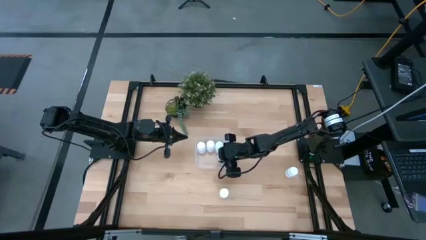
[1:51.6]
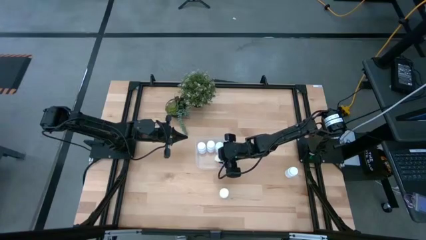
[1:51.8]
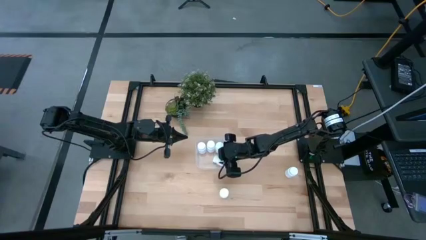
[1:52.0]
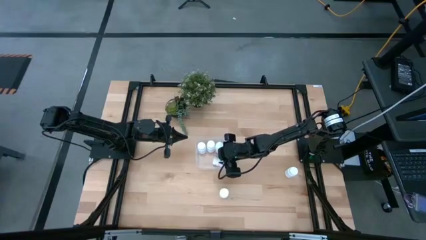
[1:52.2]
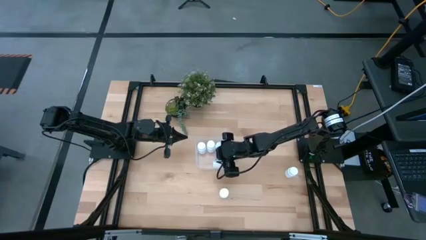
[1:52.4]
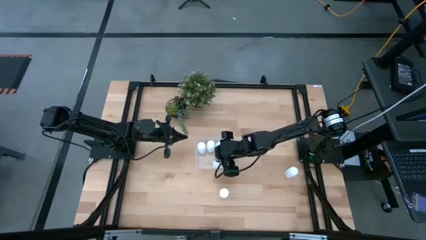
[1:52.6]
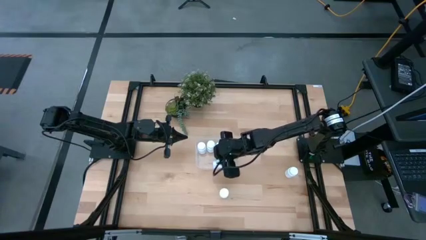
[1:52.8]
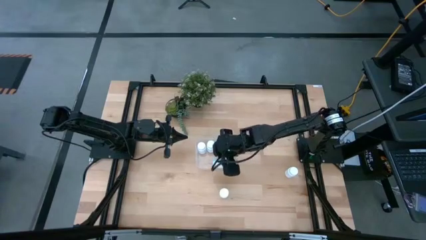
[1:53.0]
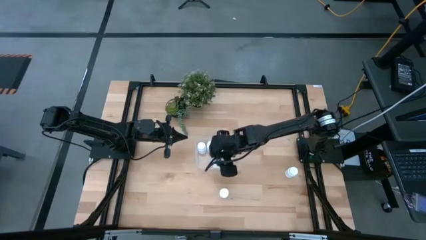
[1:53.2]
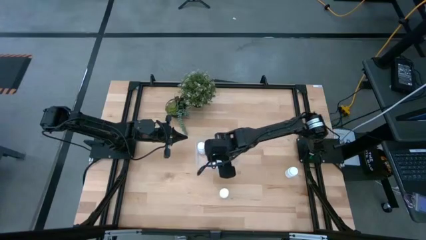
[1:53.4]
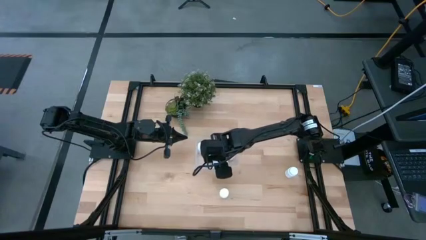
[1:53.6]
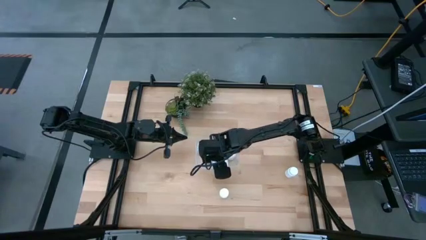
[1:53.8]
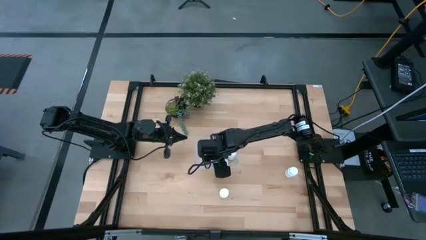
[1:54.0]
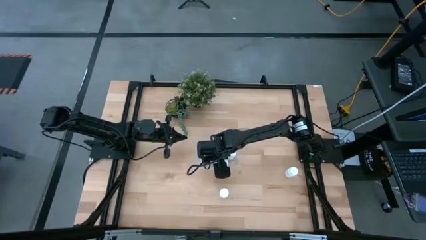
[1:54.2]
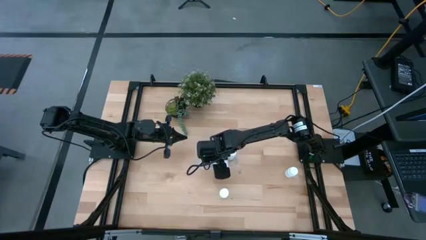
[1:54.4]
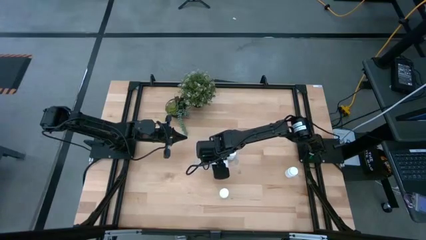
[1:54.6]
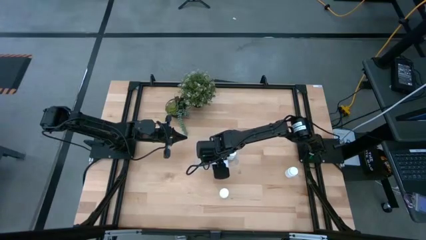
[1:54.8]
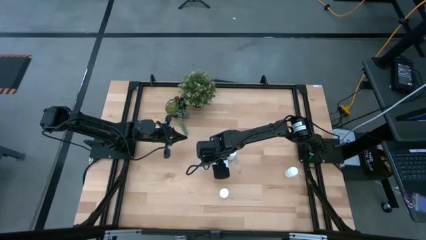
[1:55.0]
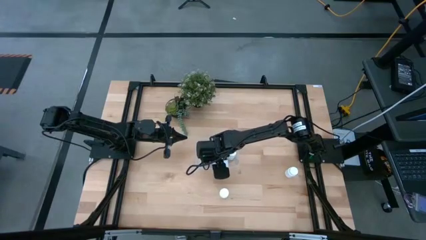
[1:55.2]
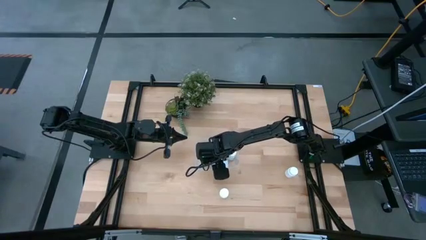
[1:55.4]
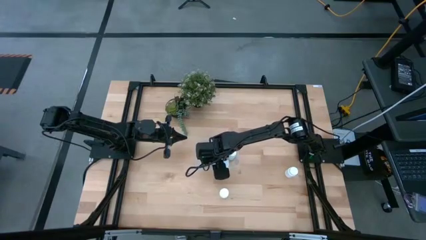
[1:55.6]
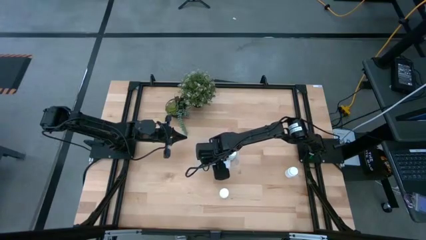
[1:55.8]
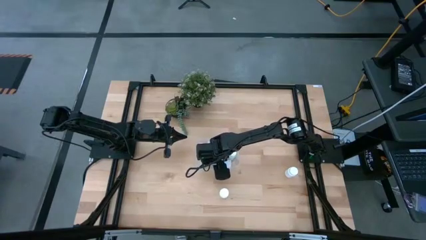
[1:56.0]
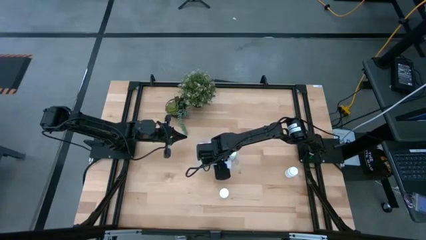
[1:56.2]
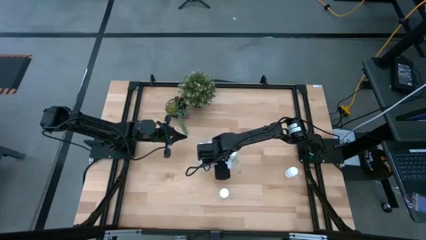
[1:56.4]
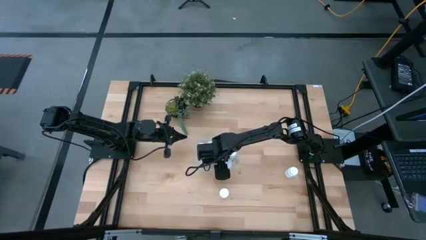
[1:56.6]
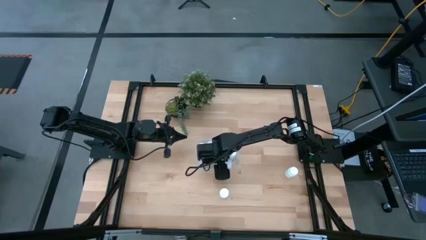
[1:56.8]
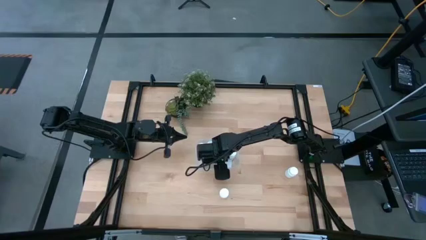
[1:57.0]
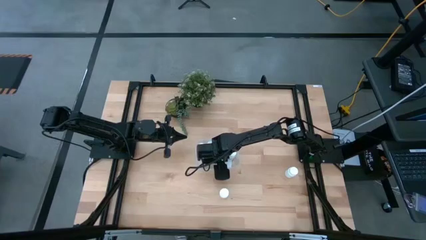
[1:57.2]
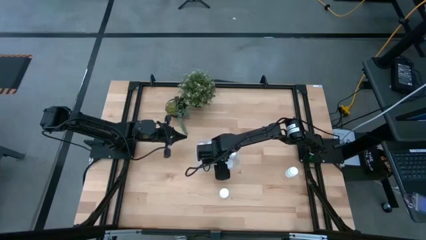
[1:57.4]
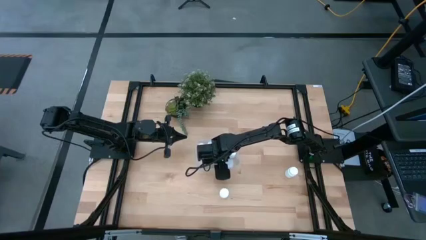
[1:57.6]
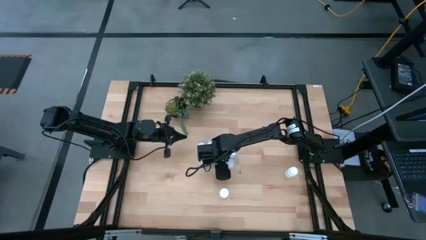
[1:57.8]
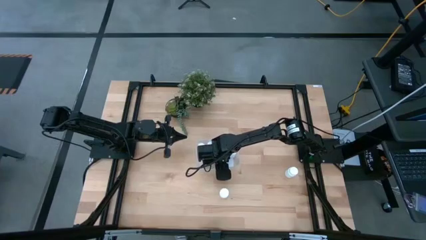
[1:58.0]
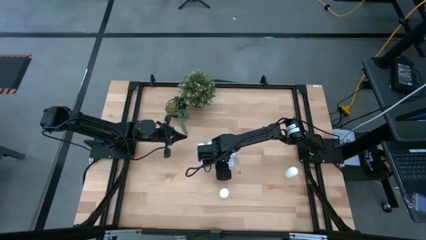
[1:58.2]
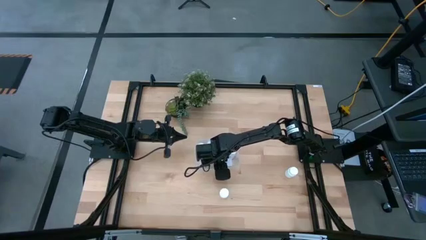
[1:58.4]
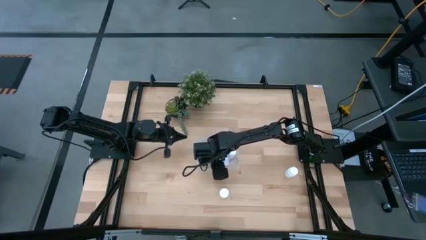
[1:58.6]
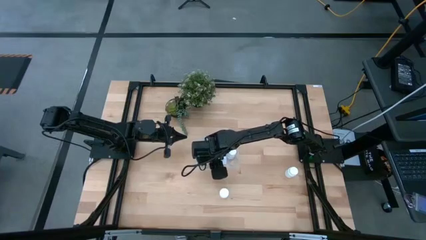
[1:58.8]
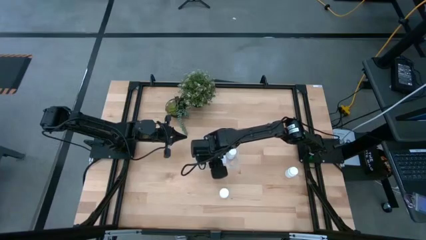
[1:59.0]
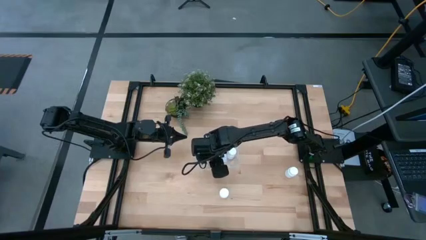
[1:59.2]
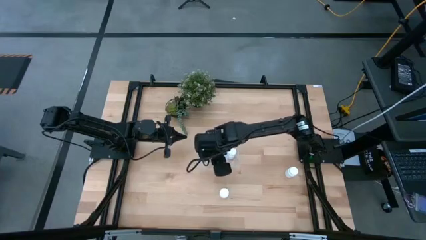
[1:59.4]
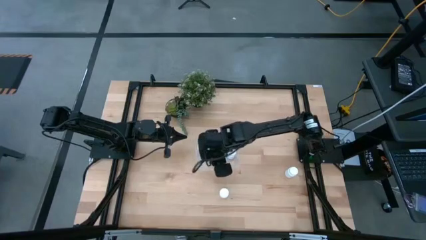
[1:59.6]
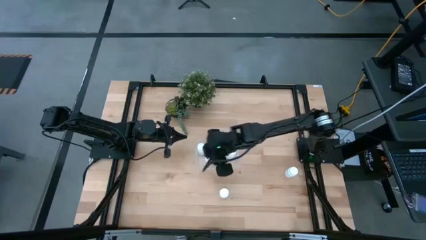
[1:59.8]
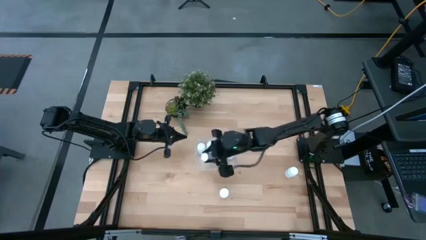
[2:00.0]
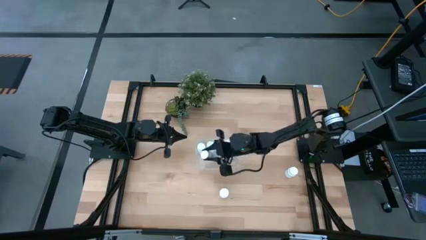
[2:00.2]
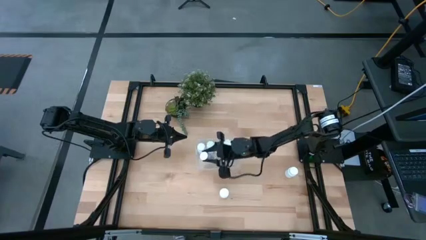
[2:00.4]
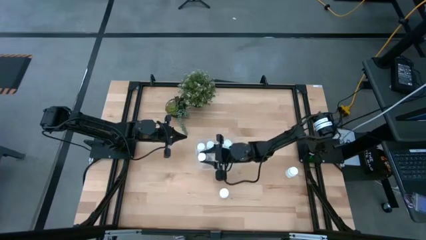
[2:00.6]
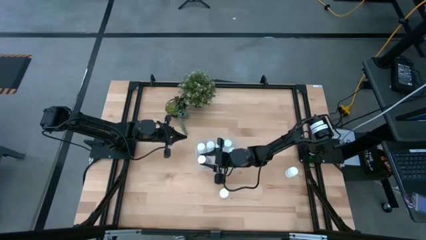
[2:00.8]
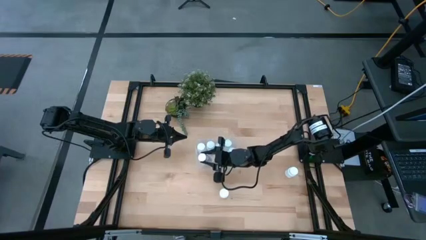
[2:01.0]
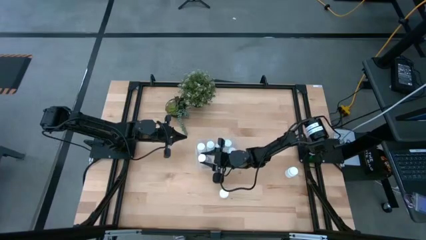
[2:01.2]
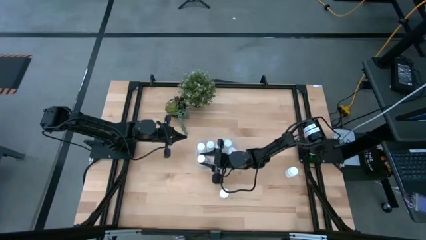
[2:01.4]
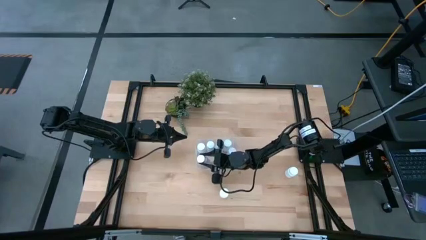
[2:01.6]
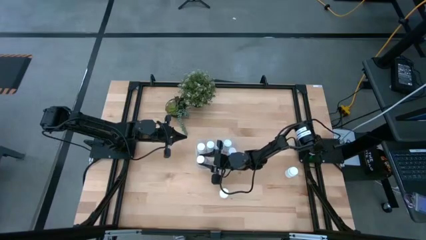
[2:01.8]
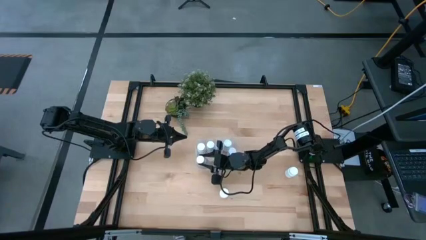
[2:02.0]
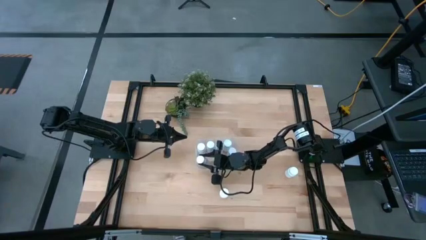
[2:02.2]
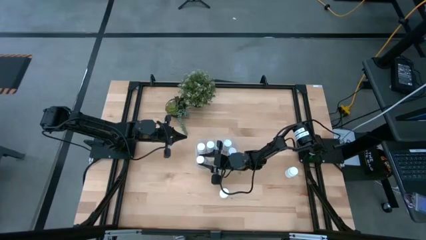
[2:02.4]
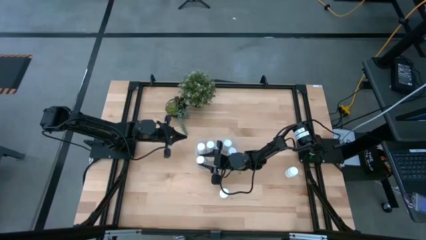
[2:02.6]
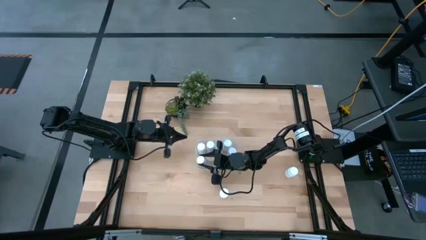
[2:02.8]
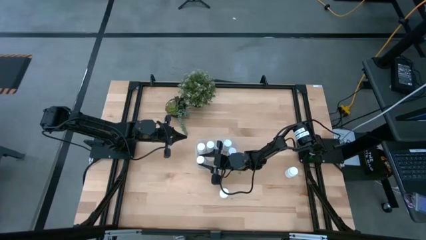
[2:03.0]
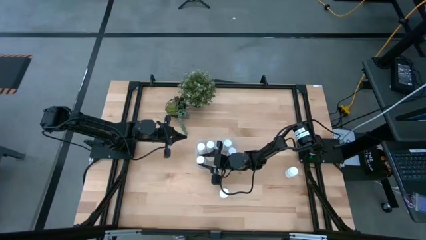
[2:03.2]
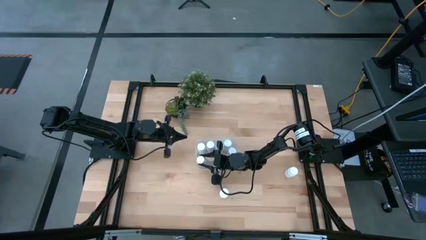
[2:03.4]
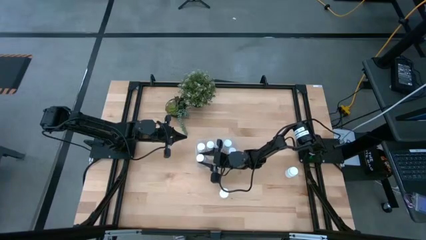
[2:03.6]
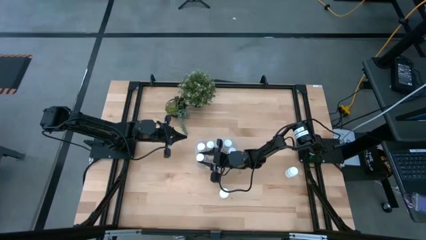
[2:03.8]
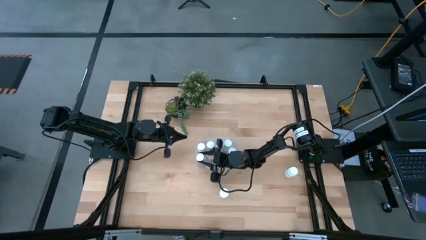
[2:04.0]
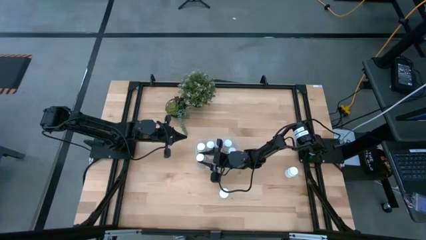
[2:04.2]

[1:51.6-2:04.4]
Task: Pick and place pill bottles into a basket
Put the top pill bottle into the bin

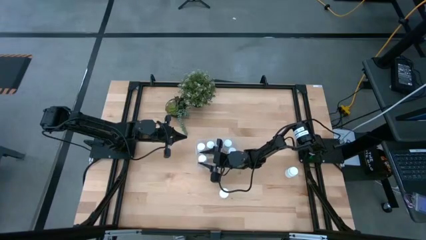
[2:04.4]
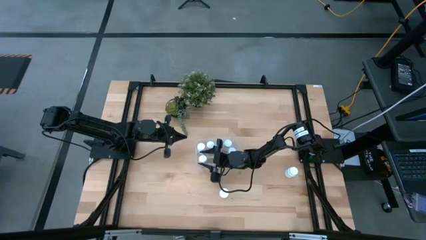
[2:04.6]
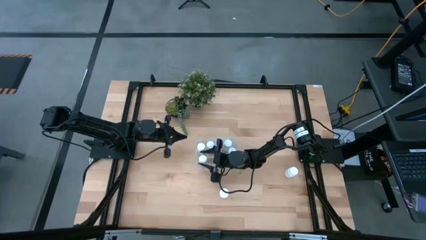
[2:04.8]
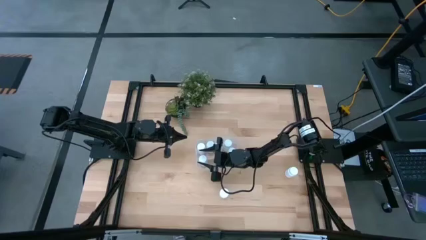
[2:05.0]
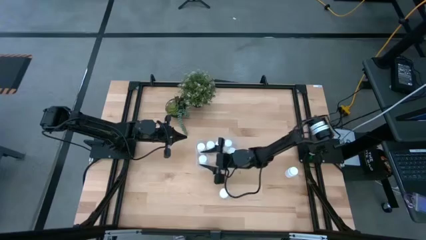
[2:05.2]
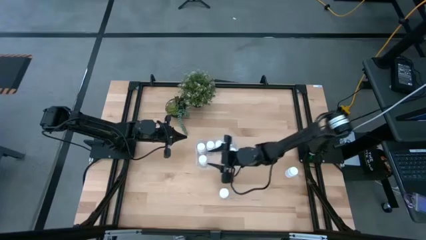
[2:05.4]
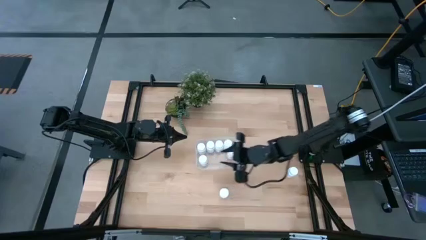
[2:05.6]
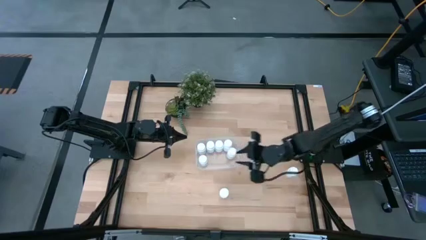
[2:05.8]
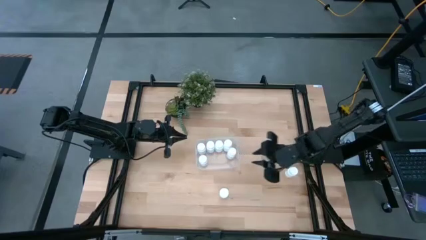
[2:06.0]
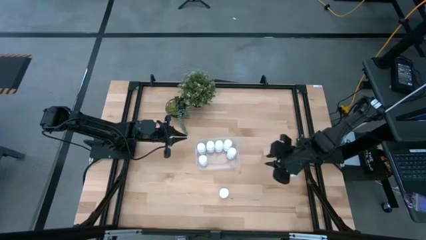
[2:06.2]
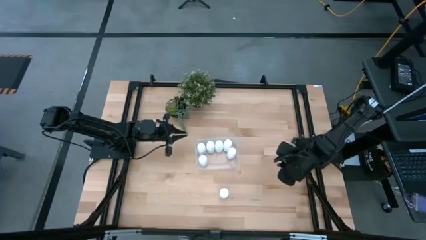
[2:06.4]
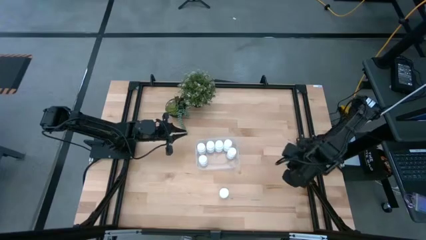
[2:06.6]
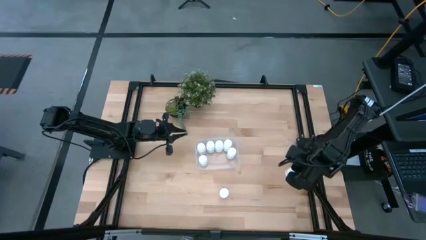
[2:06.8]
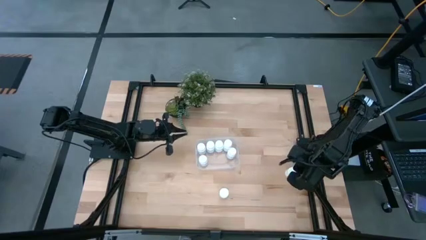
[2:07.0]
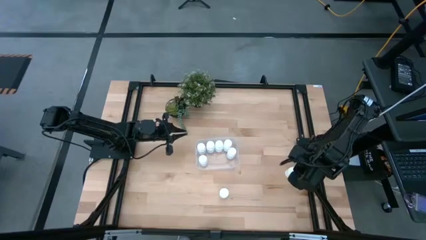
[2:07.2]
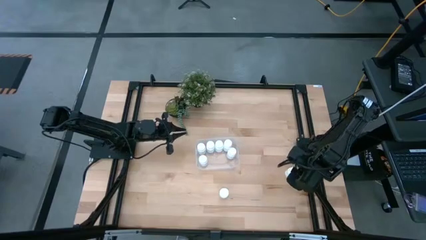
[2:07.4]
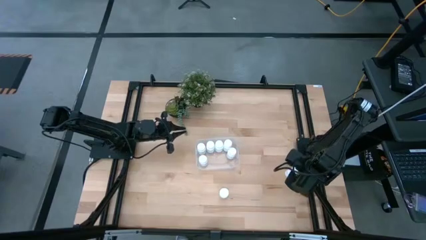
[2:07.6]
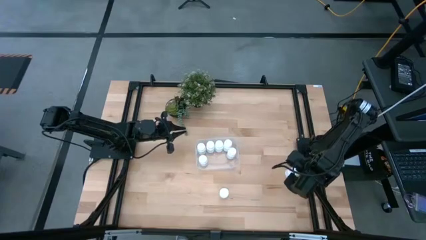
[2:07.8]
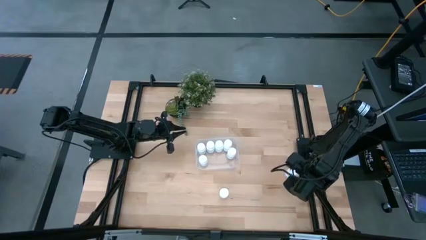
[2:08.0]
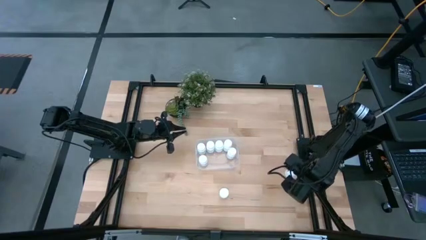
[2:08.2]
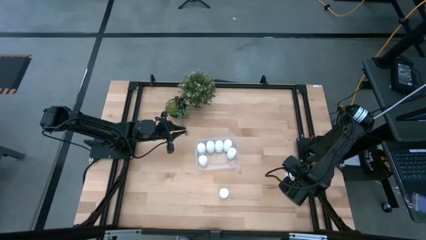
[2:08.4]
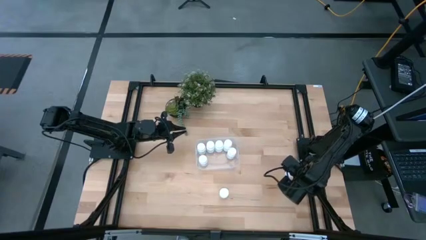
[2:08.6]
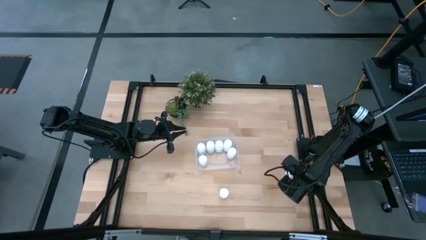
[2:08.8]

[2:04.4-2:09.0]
Put the right pill bottle into the bin
